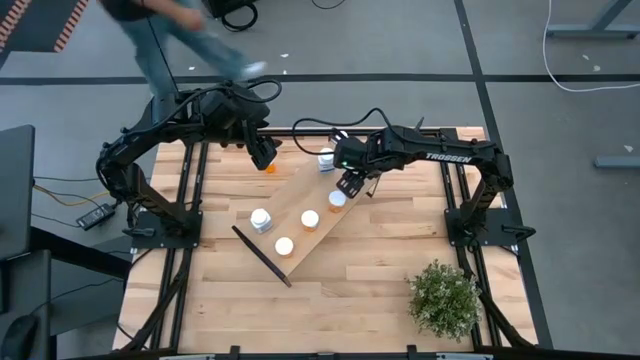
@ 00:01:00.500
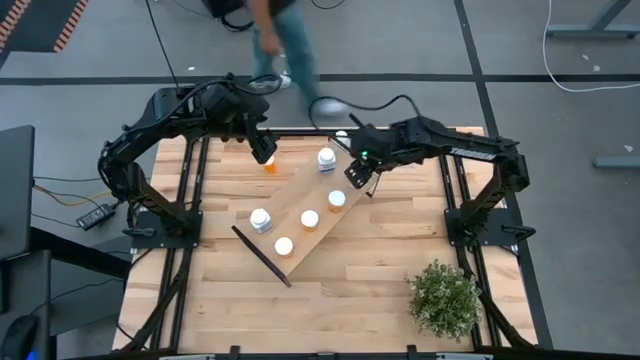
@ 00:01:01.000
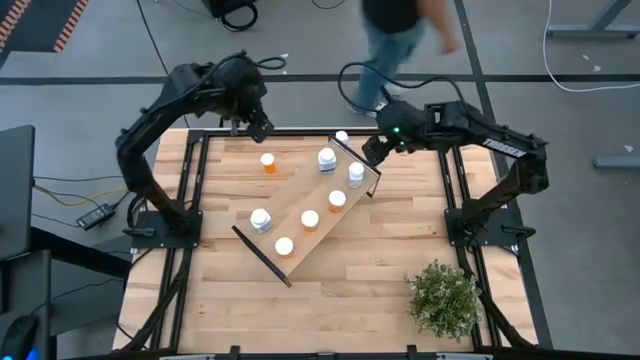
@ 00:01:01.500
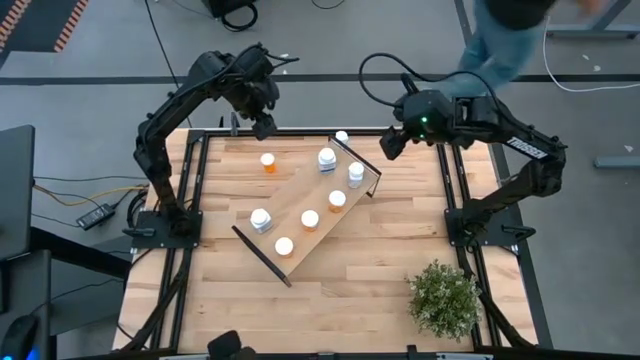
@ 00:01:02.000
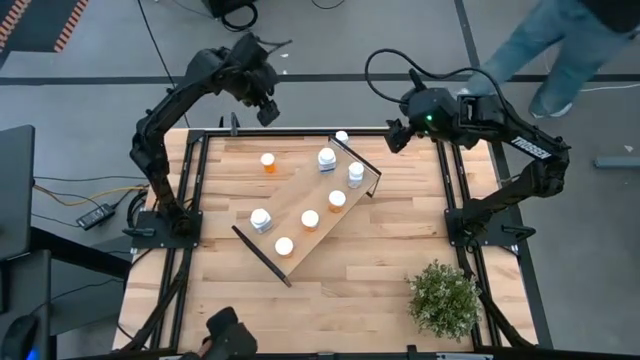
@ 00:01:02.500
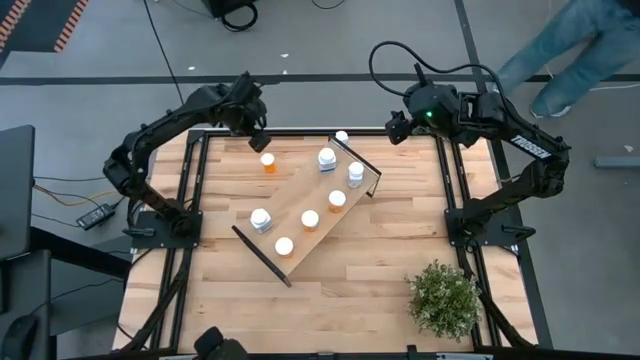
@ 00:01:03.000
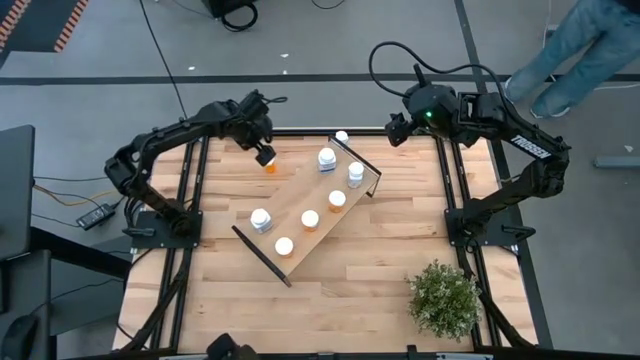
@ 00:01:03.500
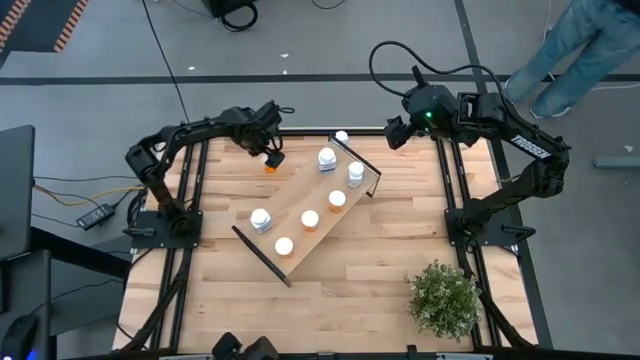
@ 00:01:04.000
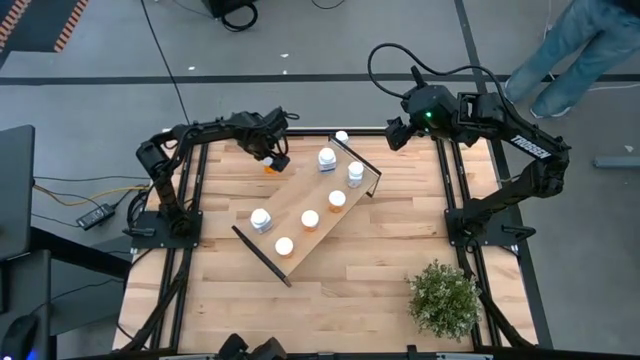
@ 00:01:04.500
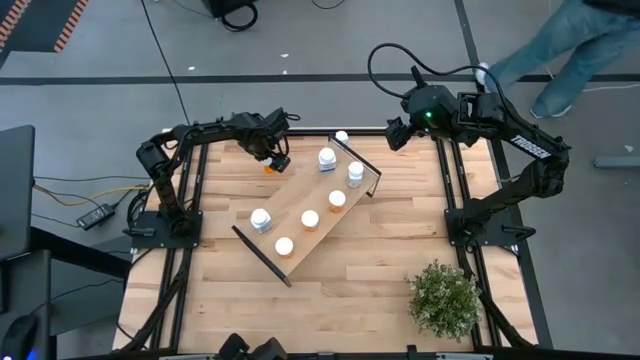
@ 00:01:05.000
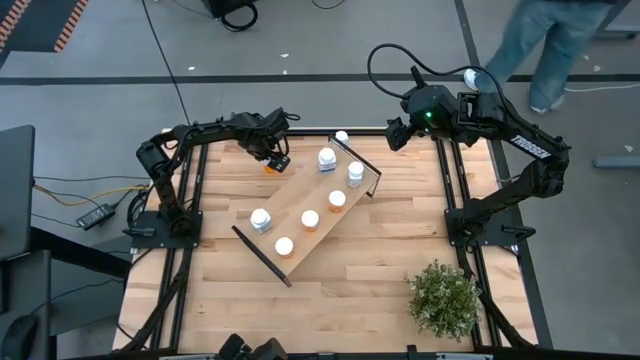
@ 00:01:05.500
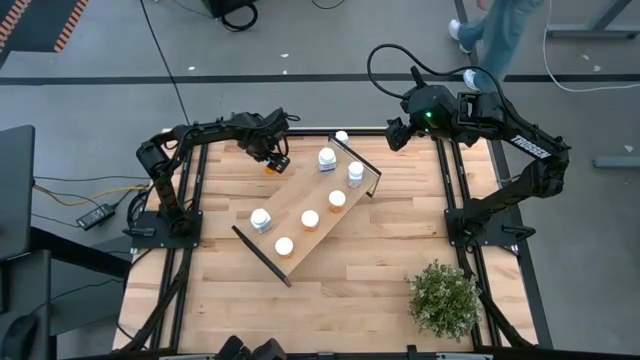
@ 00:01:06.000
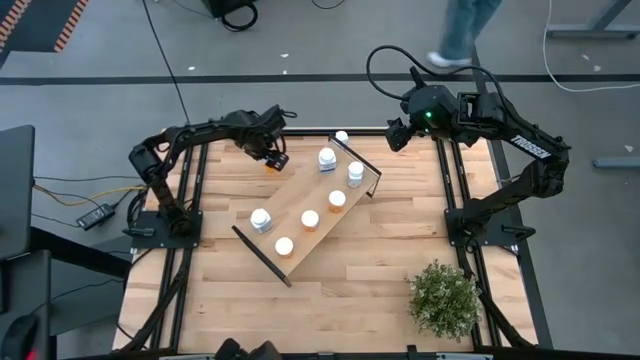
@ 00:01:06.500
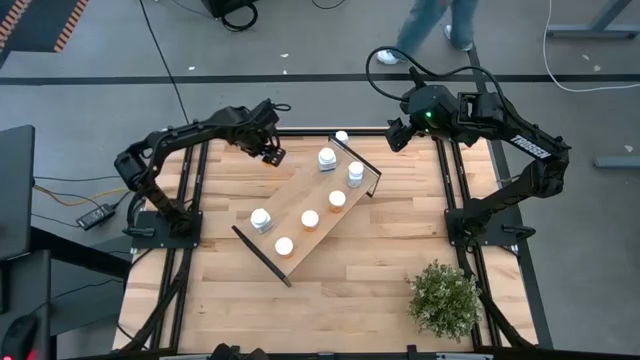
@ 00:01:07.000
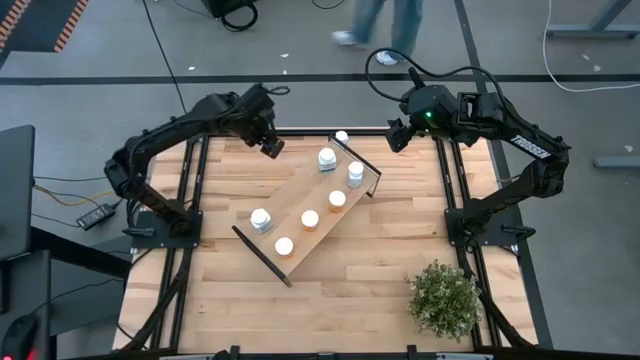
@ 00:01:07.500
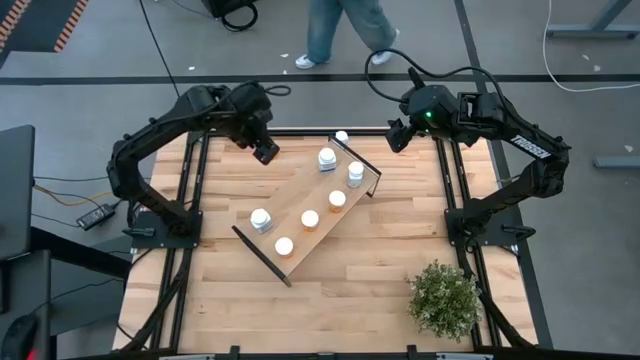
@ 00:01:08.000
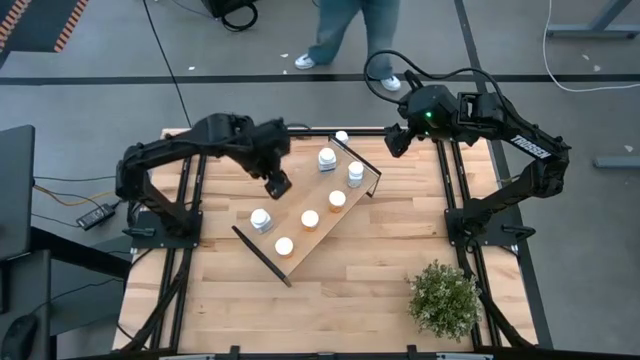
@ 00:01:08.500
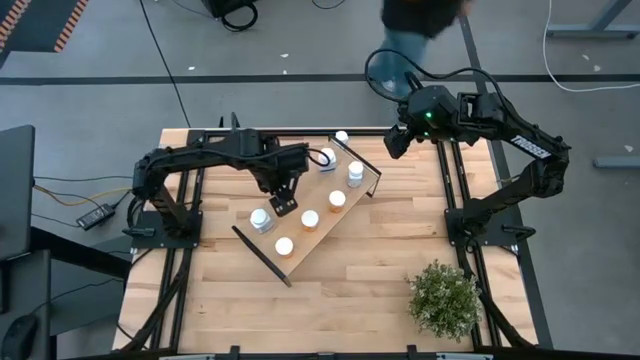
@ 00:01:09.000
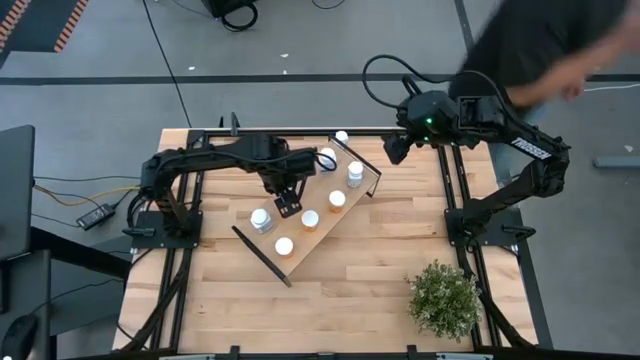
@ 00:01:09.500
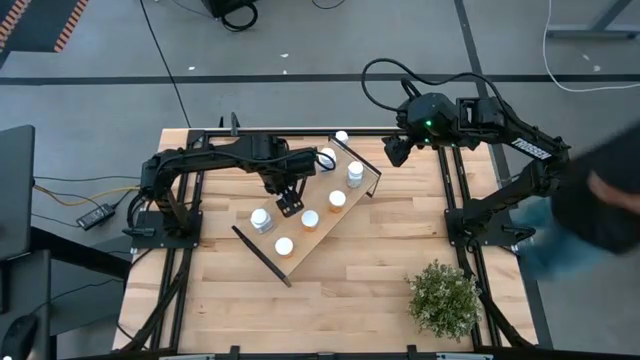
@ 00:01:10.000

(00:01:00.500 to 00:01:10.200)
Task: Pick and place medicine bottles onto shelf by color
Put the orange pill bottle on the shelf

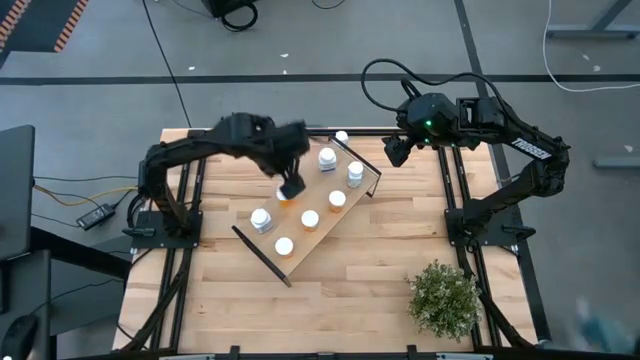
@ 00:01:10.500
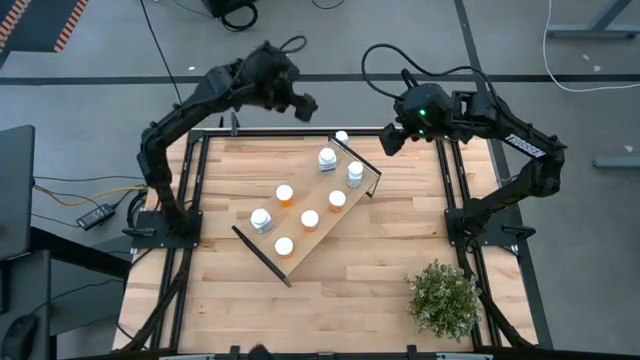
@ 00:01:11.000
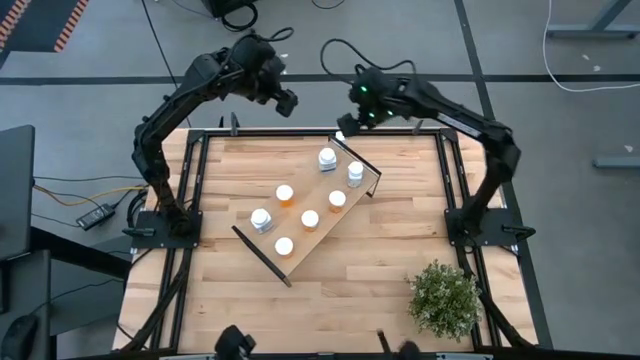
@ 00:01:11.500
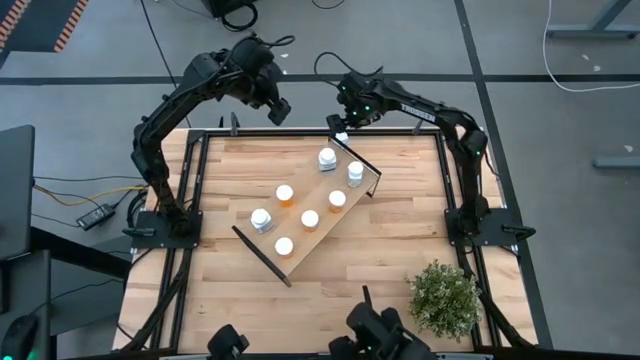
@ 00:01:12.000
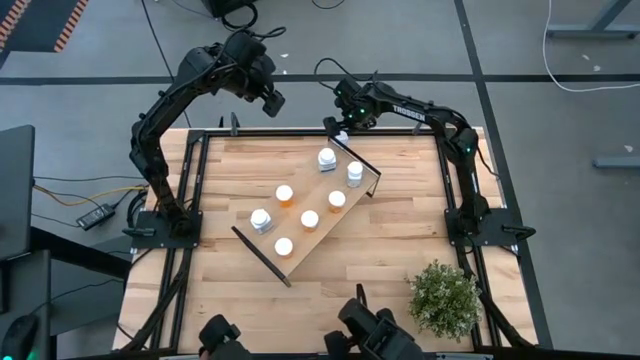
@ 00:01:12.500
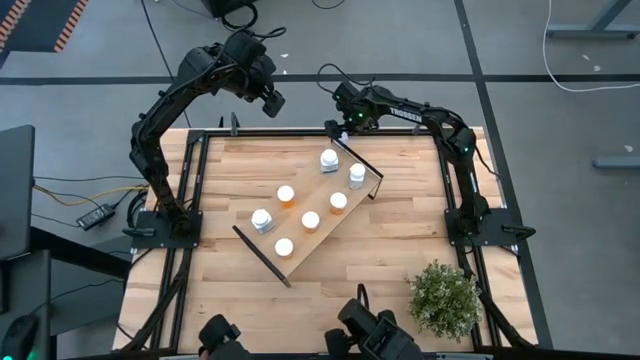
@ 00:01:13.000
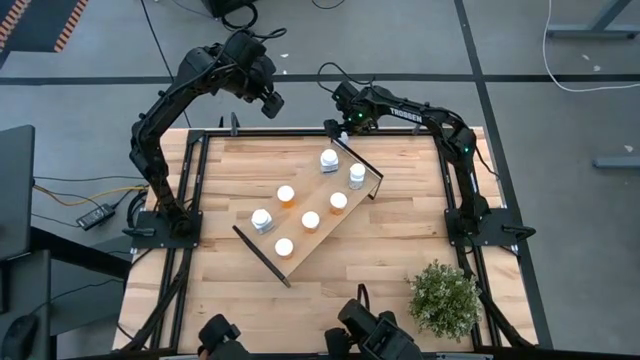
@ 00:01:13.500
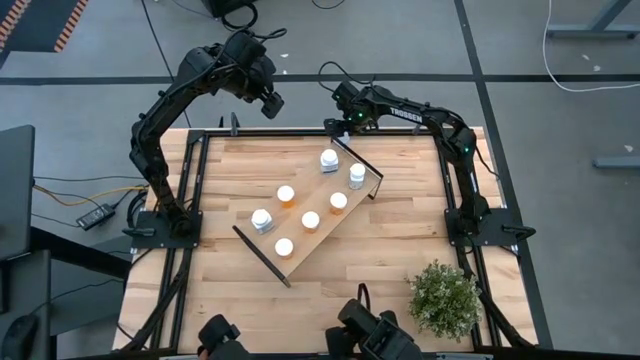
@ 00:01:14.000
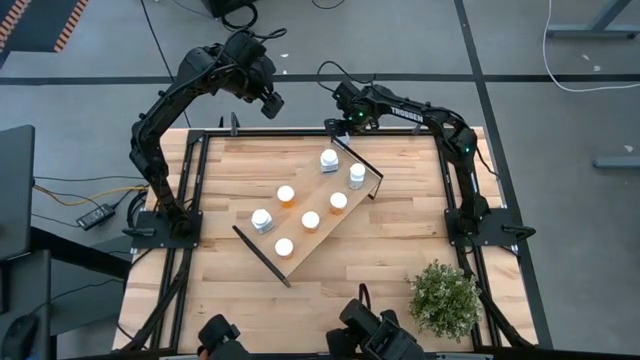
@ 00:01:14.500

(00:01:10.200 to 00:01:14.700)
Put the white pill bottle on the shelf

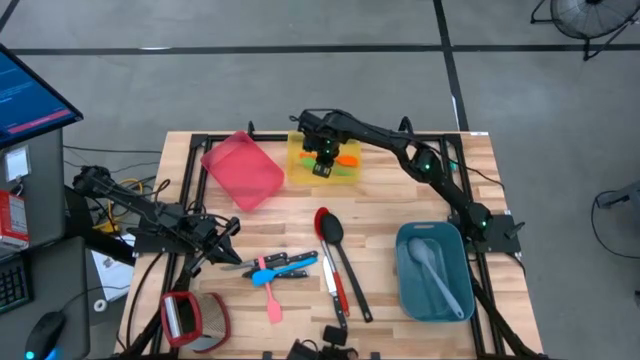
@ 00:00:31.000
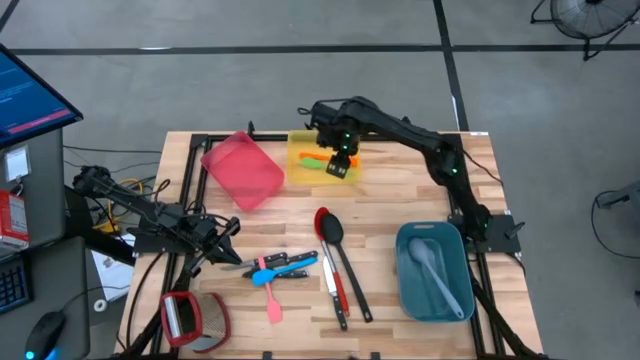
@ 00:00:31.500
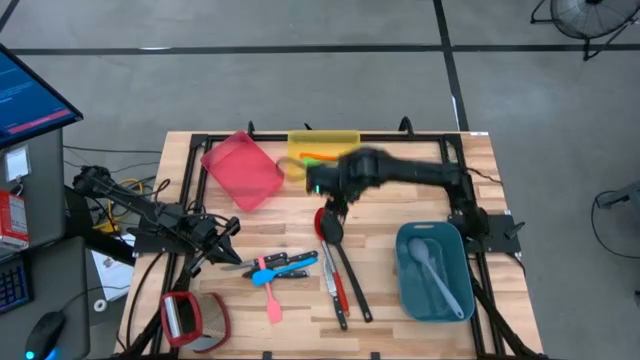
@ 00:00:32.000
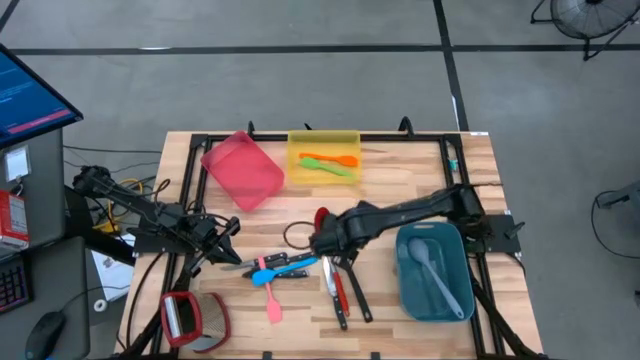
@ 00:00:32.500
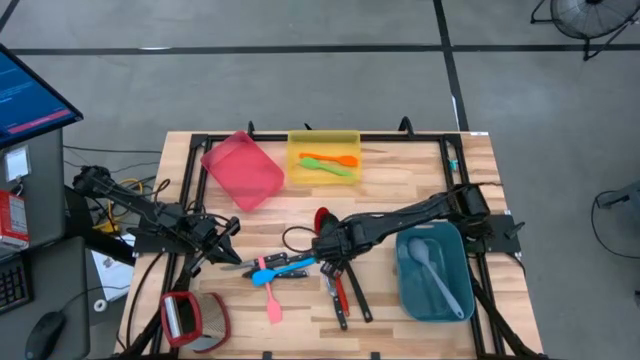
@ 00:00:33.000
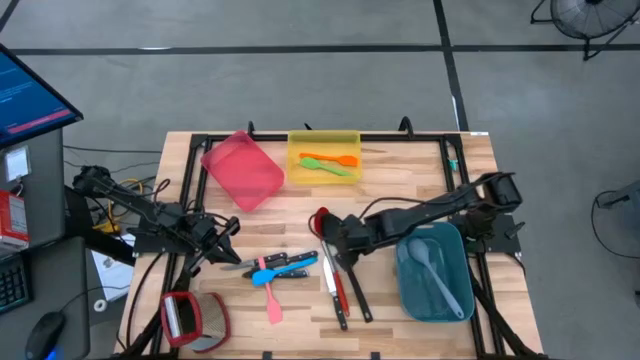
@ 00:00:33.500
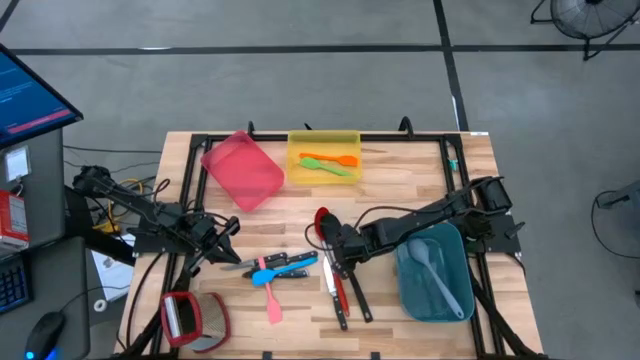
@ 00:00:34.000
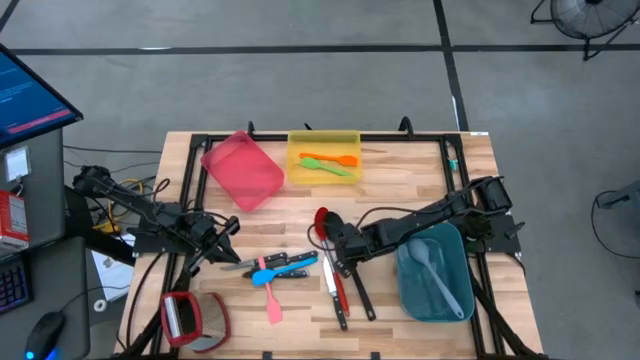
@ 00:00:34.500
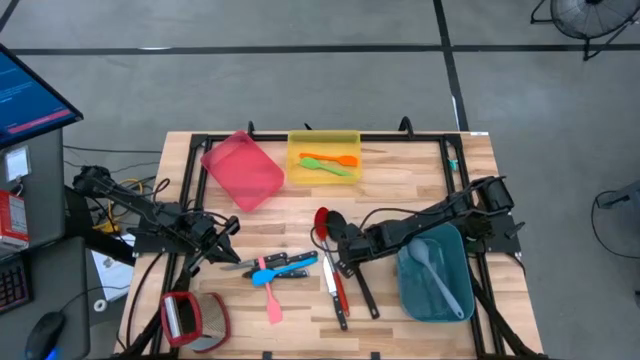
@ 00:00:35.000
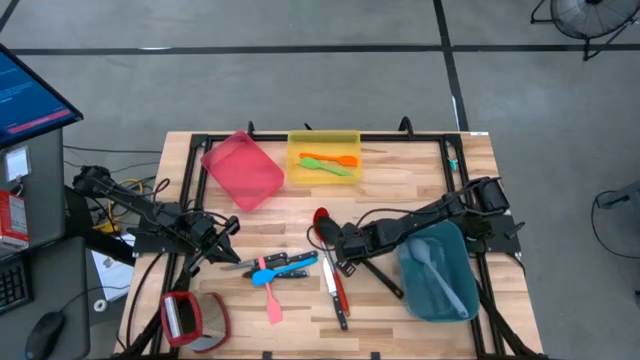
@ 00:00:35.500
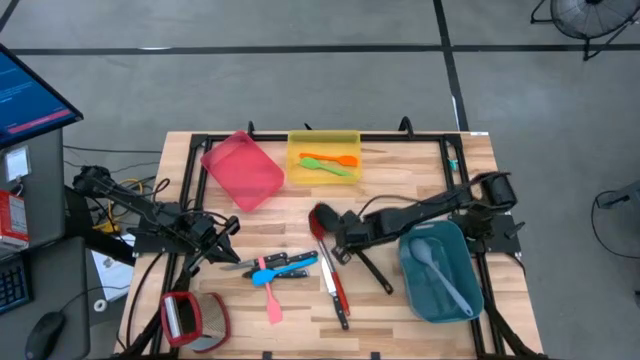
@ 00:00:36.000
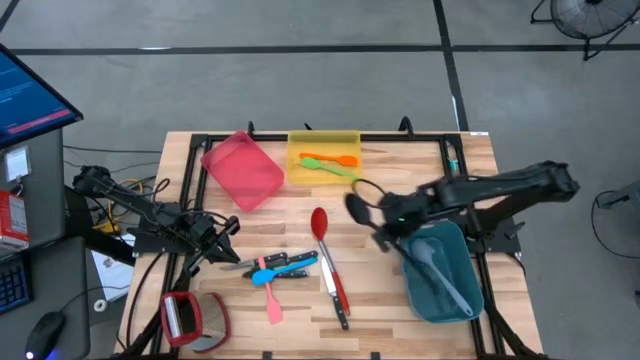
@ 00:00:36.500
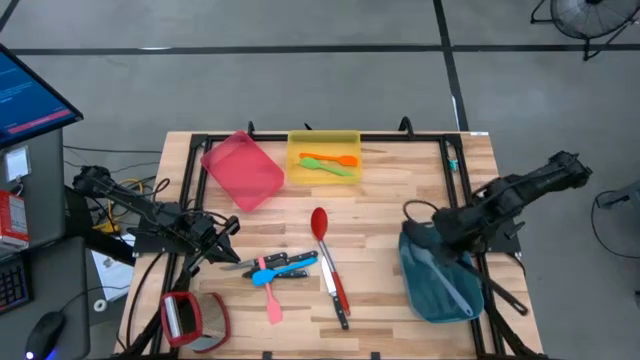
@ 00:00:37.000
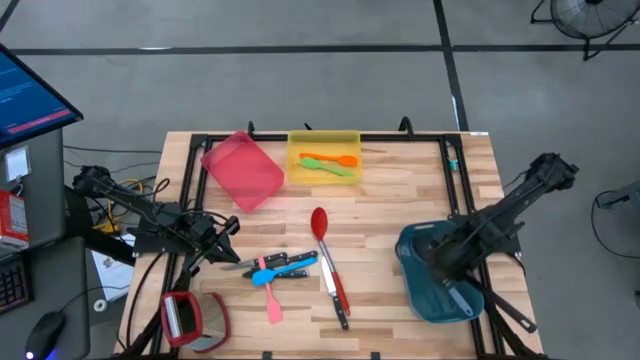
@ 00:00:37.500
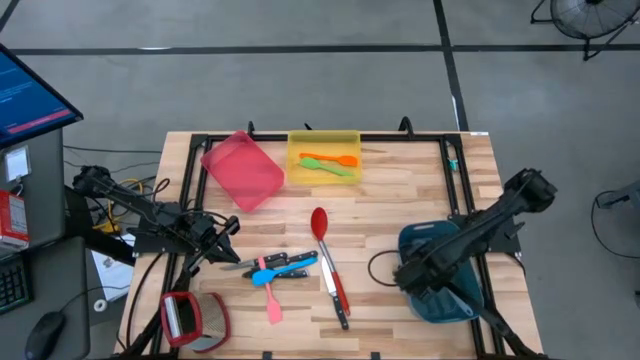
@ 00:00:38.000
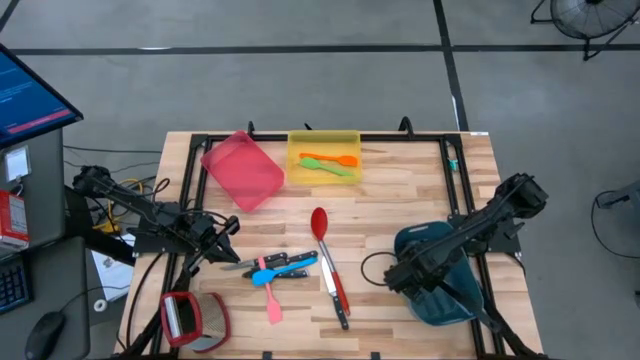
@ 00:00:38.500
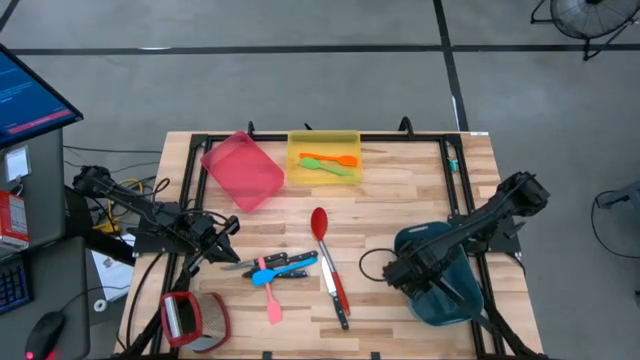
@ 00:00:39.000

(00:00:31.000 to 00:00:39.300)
Task: Pick & Place Kitchen Items
Put the black serving spoon into the dark blue bin
